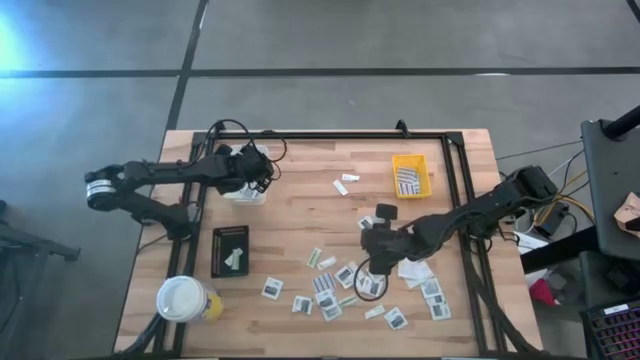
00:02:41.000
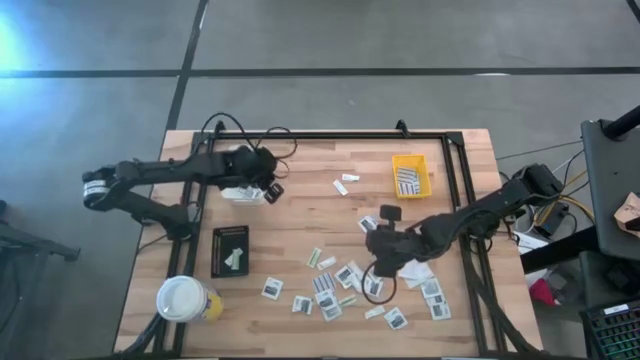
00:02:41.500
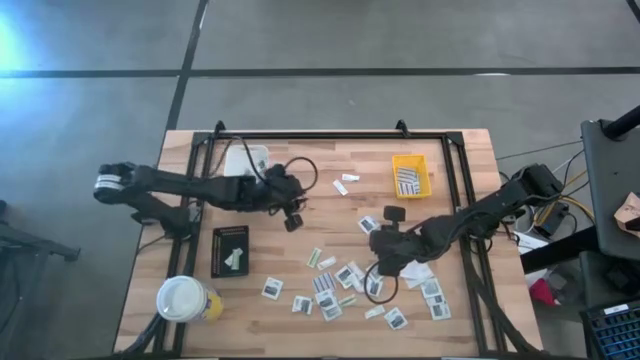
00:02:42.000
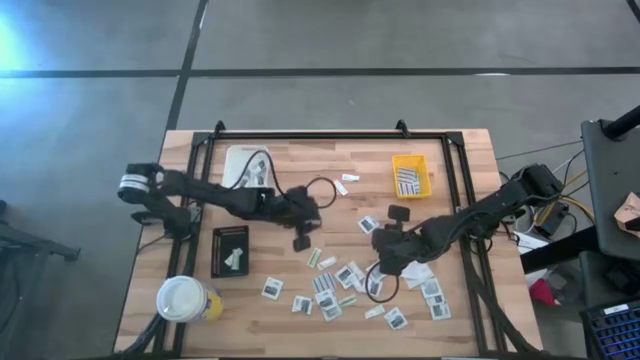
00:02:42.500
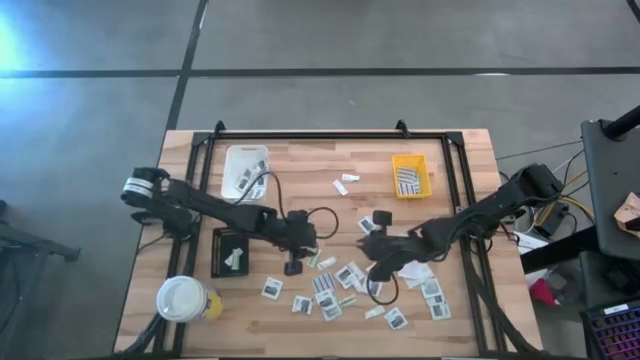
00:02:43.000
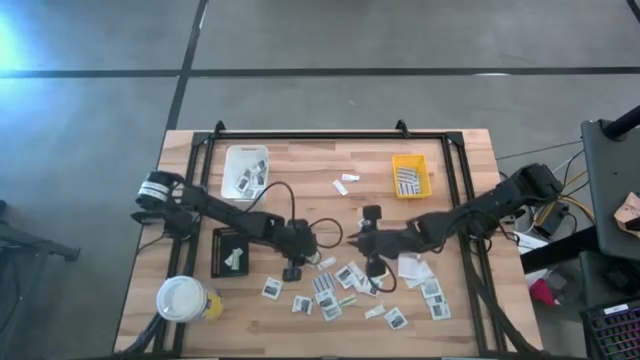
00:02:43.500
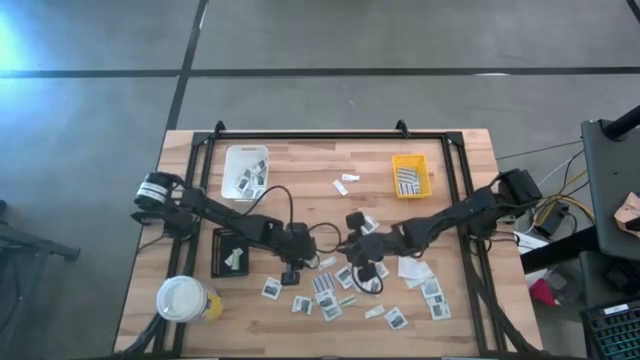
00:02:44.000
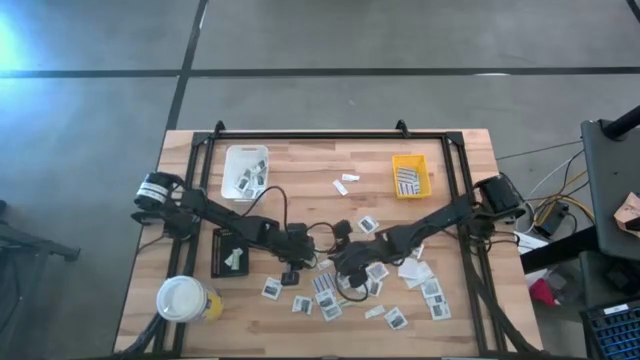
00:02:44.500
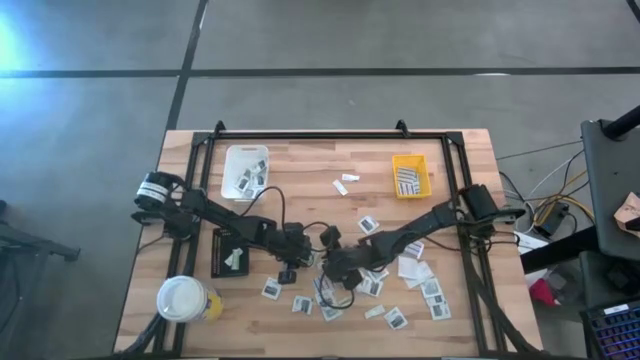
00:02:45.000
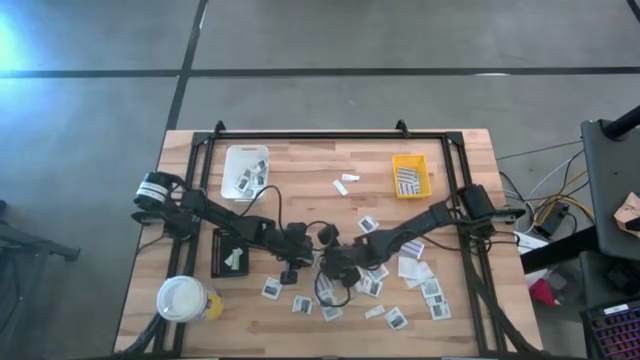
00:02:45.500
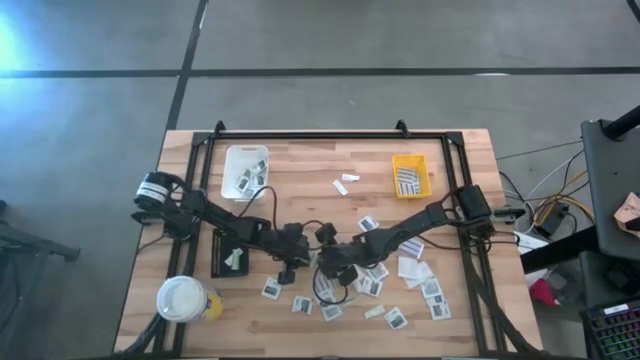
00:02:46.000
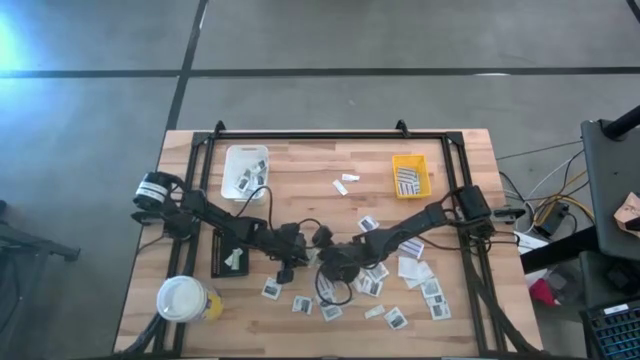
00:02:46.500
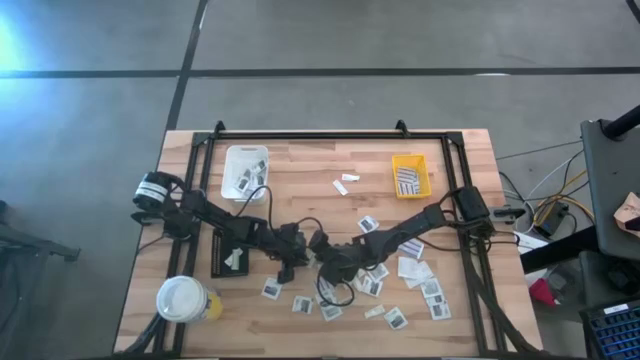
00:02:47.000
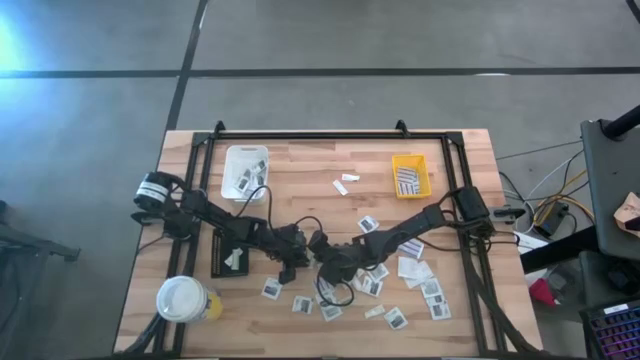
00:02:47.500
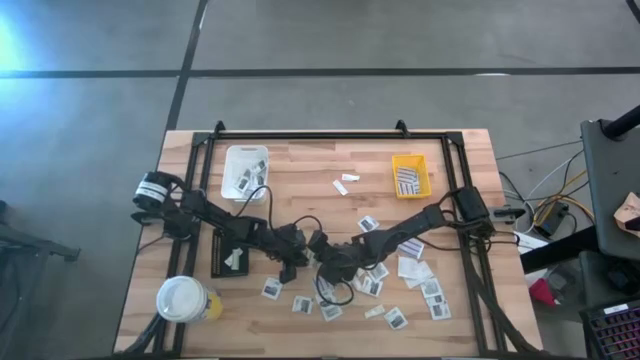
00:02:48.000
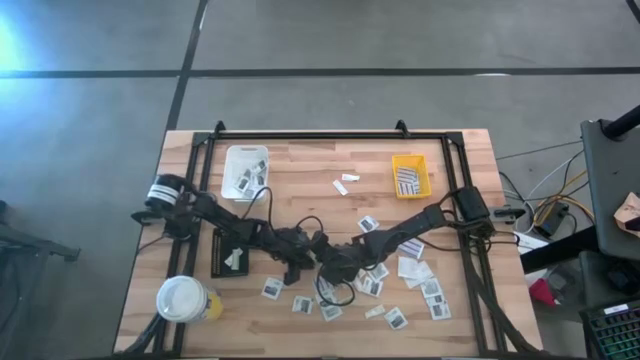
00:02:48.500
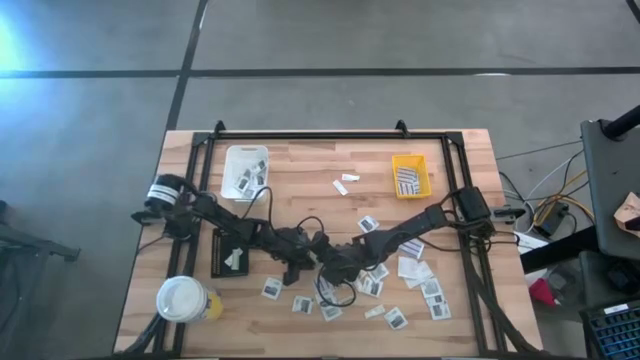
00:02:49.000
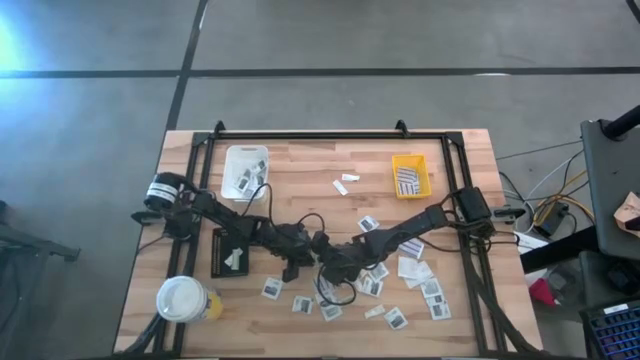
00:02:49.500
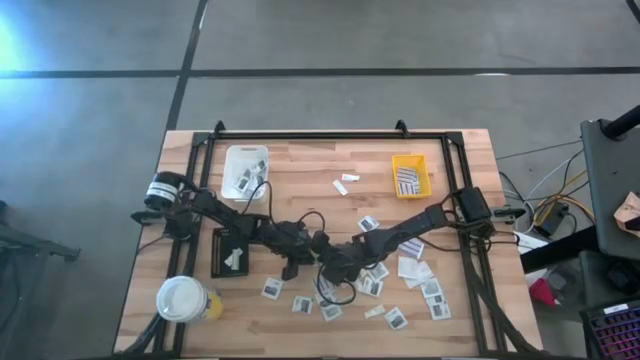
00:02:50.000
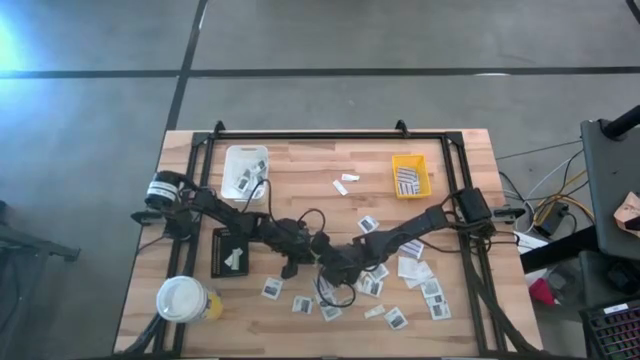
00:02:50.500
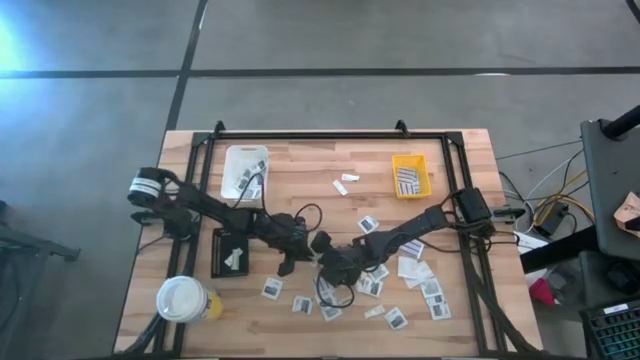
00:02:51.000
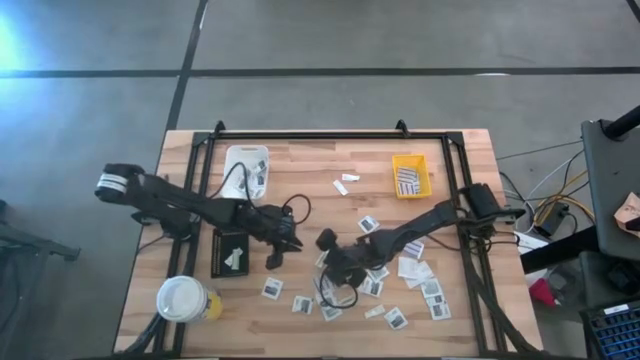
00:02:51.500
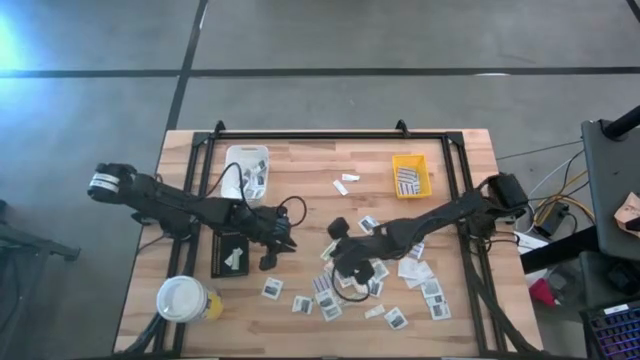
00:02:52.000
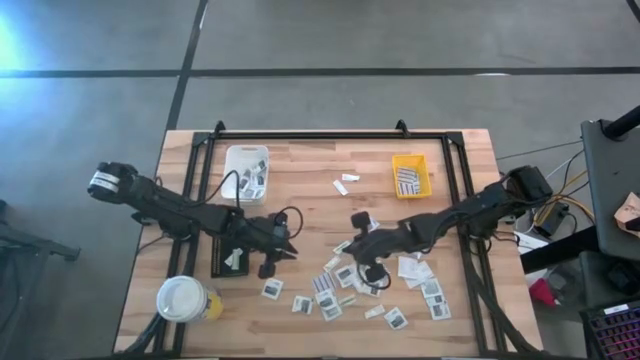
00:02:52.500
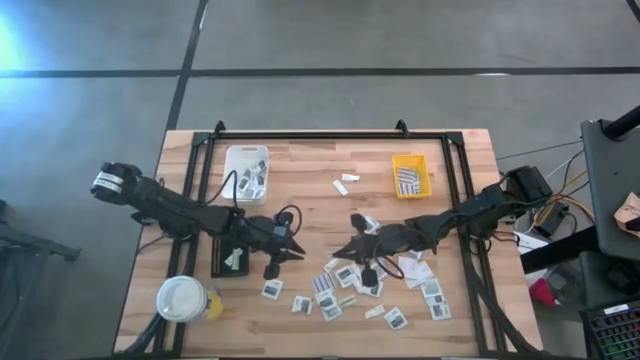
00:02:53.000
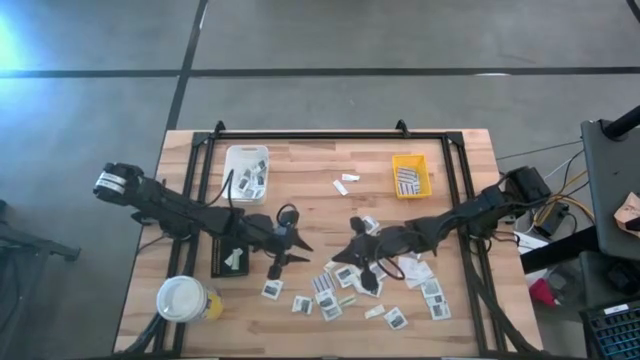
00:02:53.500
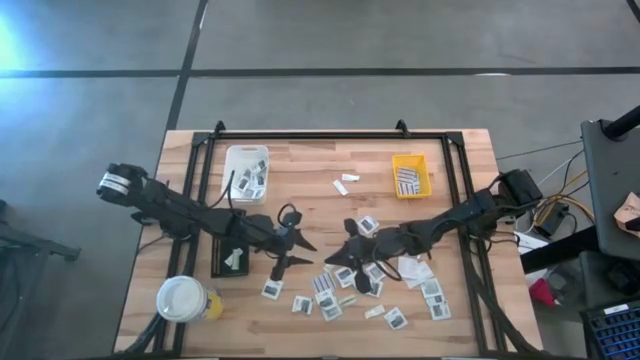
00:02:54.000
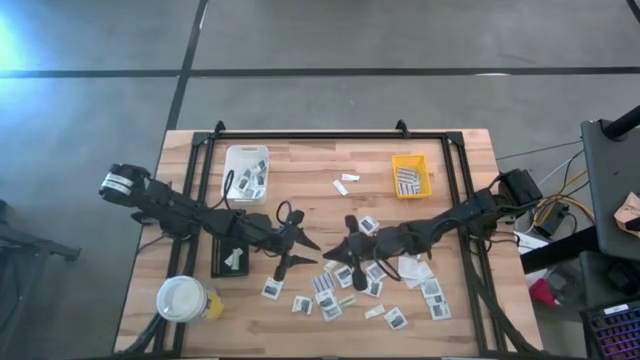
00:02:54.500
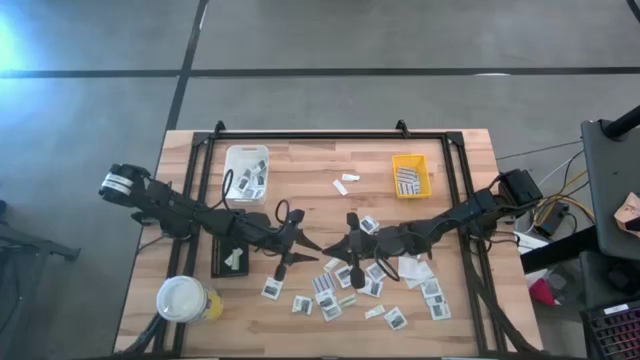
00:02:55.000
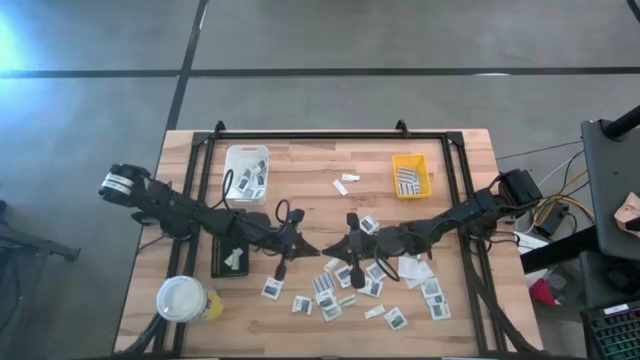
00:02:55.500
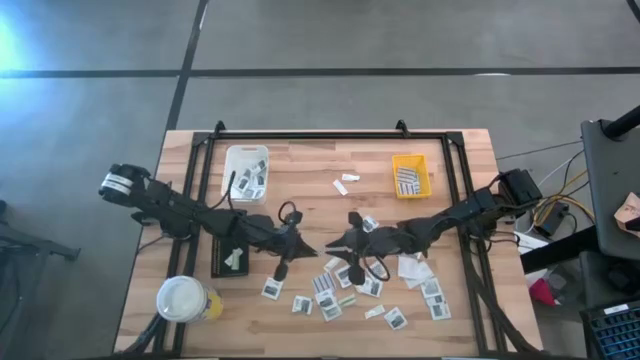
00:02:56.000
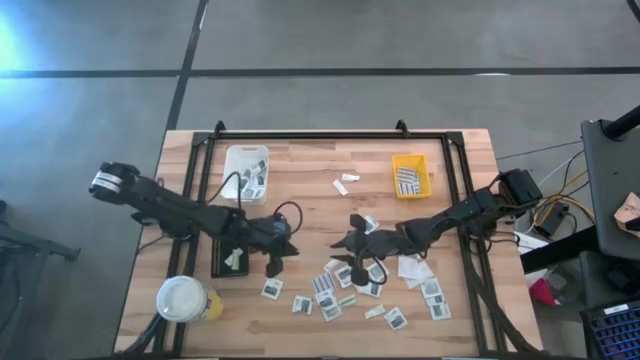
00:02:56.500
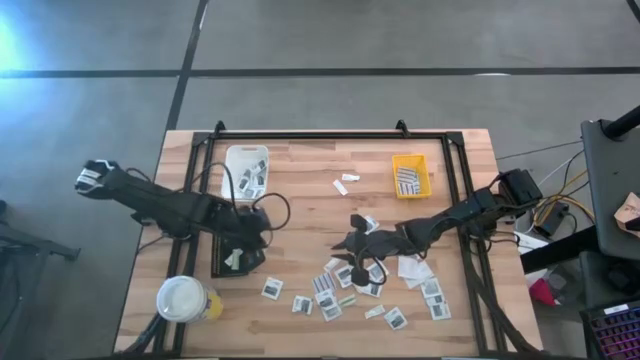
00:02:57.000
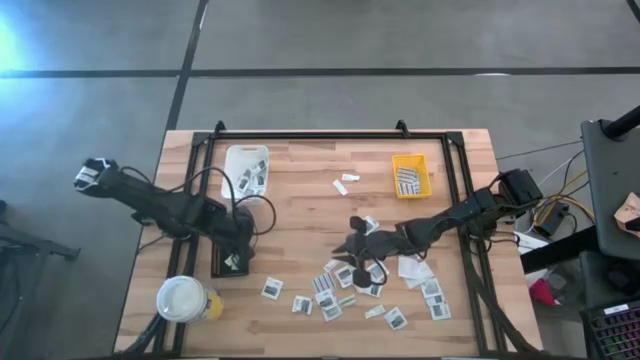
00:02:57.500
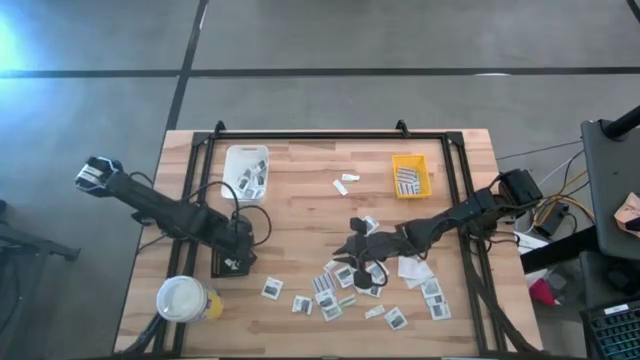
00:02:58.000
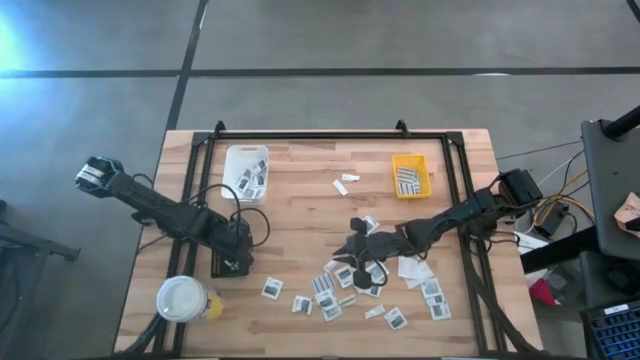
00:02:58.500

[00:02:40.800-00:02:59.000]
Task: Pick & Place First Aid Supplies
Put the green bandage pack into the black bin

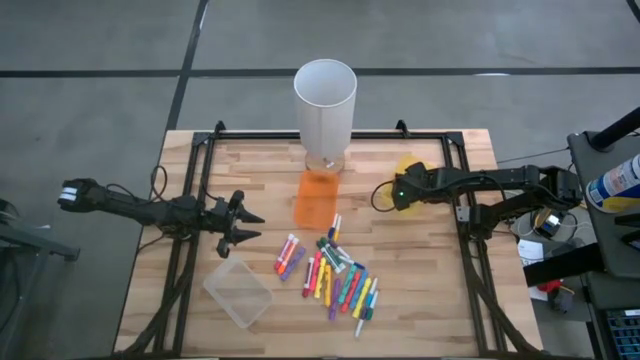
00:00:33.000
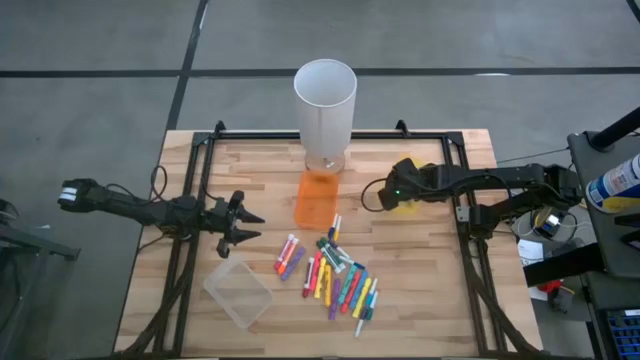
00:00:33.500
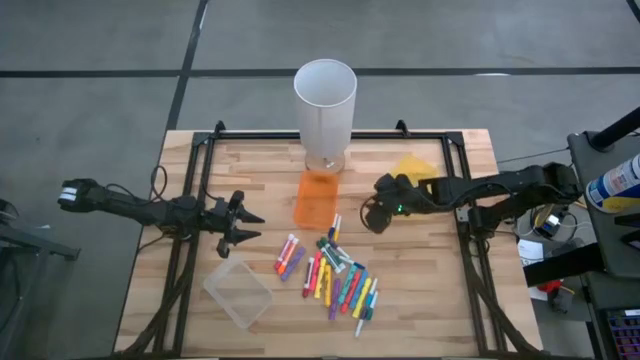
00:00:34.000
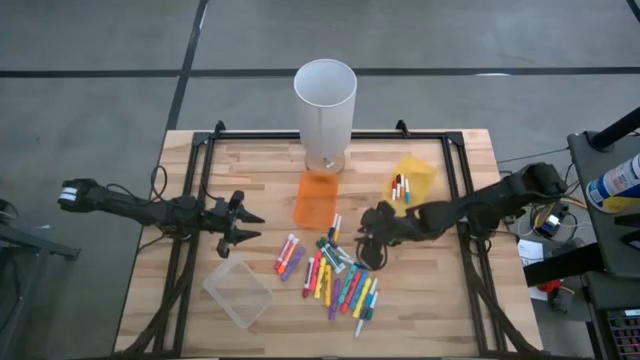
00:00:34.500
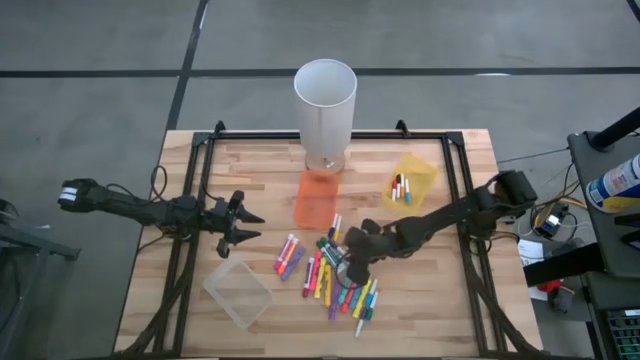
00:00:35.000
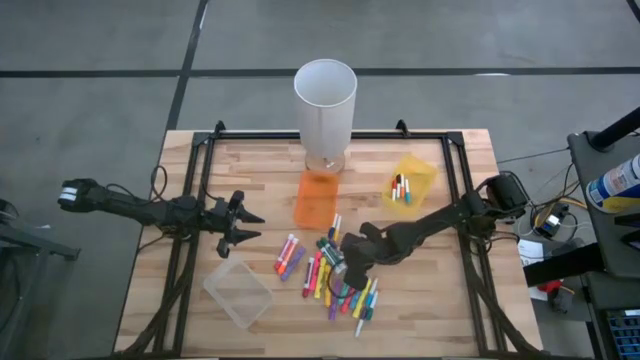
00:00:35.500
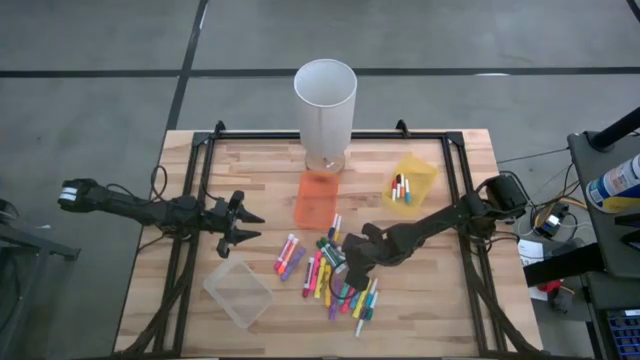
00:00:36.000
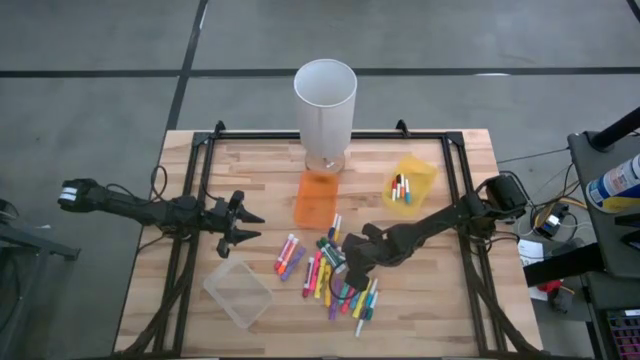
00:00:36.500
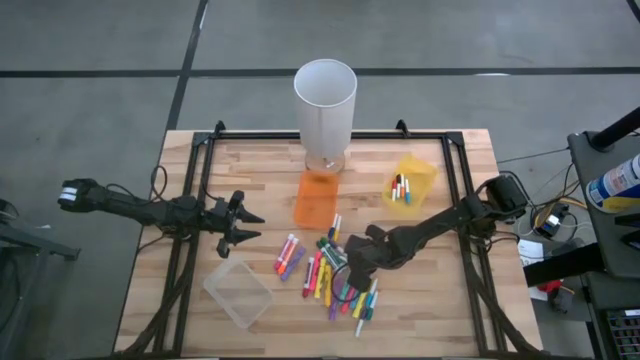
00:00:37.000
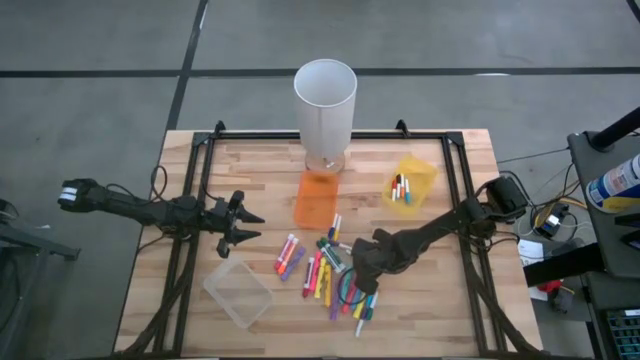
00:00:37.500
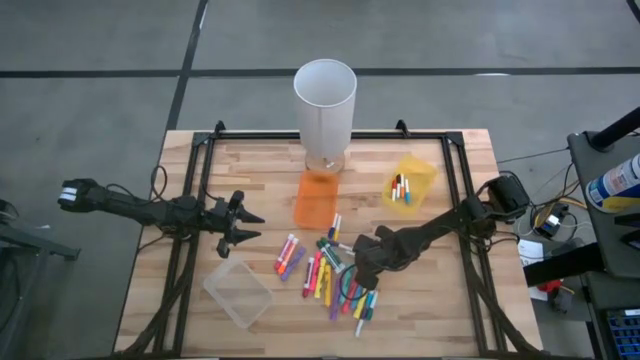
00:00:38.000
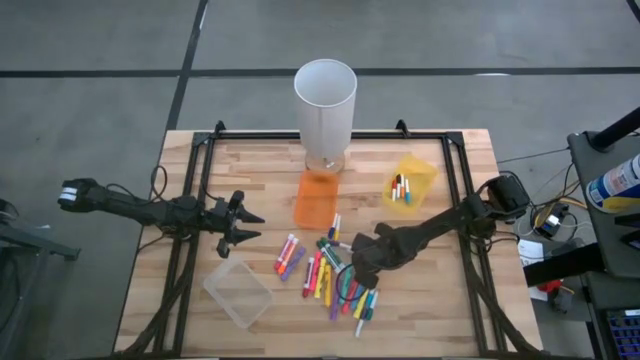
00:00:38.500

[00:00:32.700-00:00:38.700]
Task: Pick & Place Markers
Put the bottom small blue marker pen into the yellow bin
